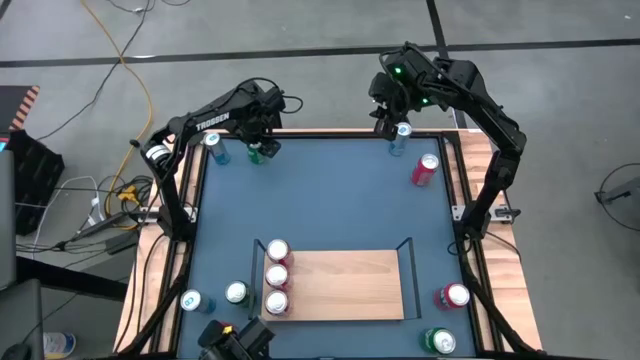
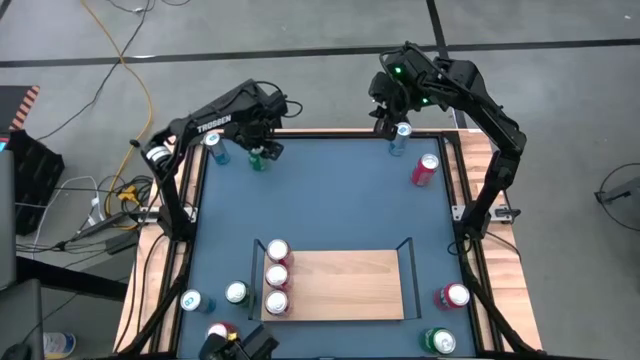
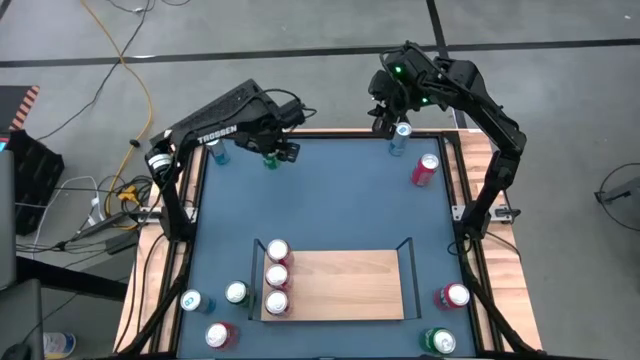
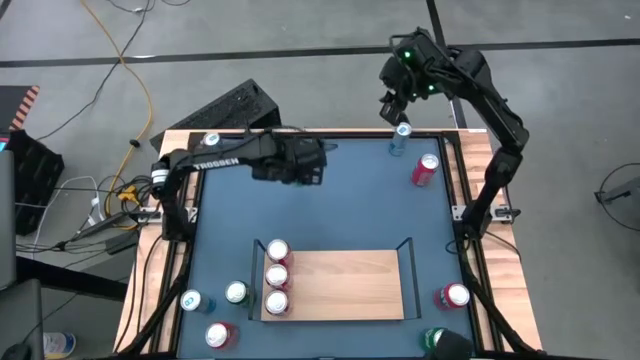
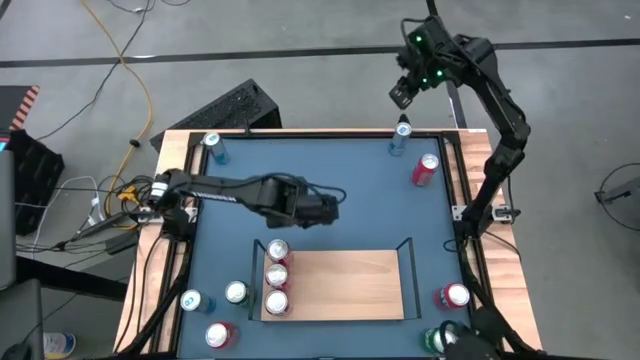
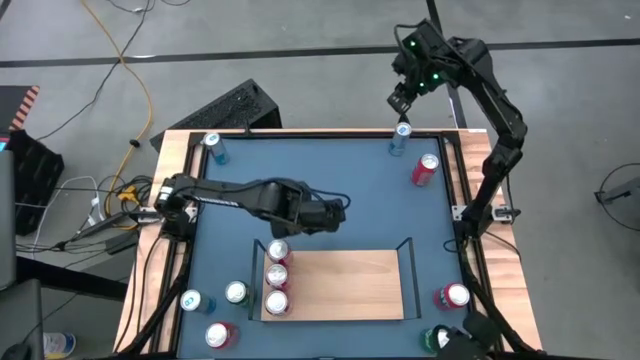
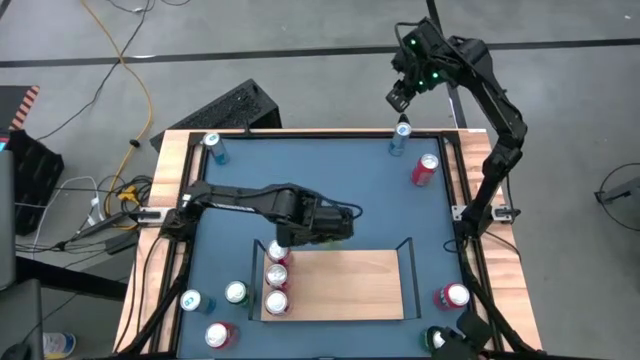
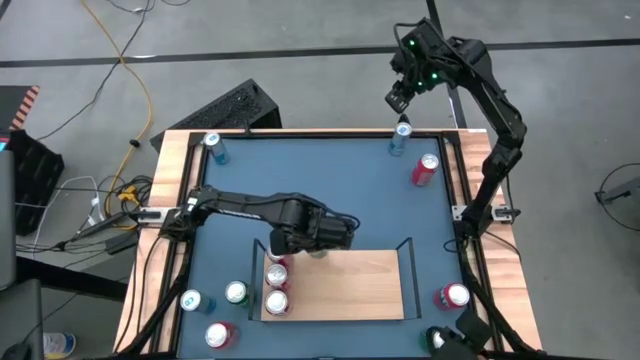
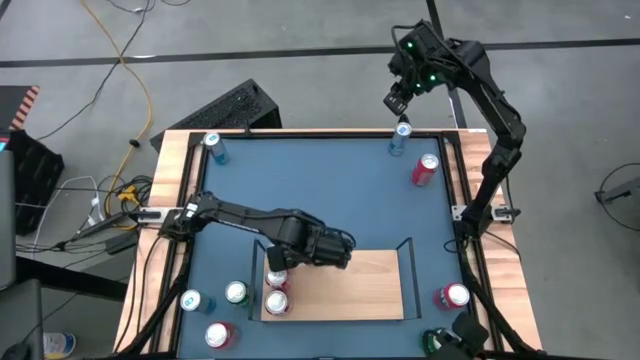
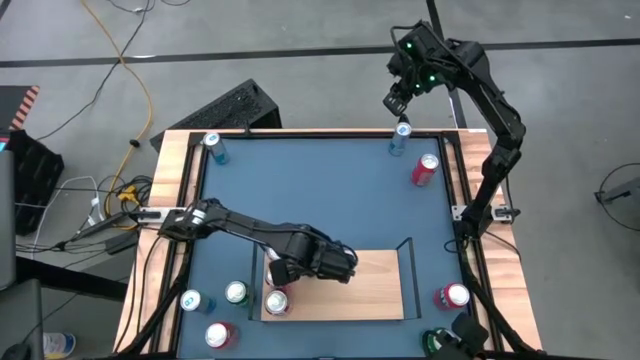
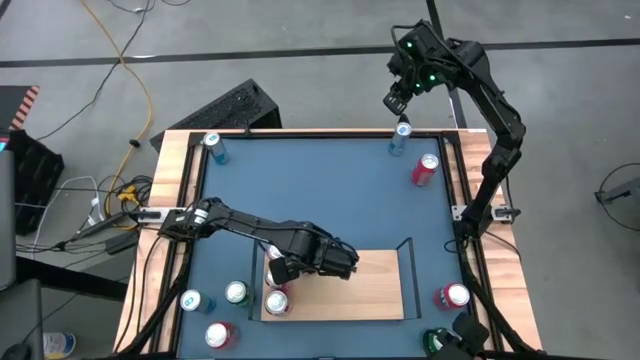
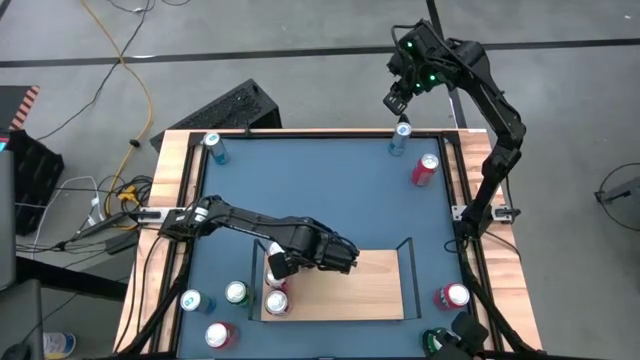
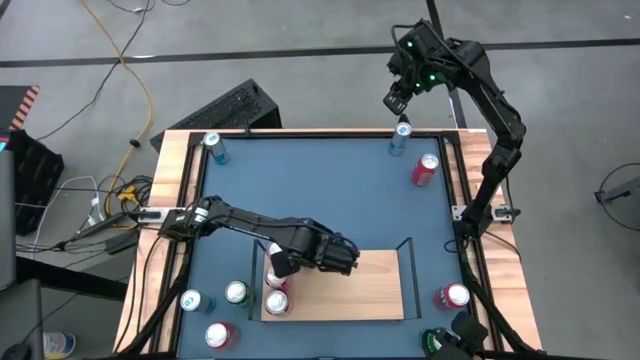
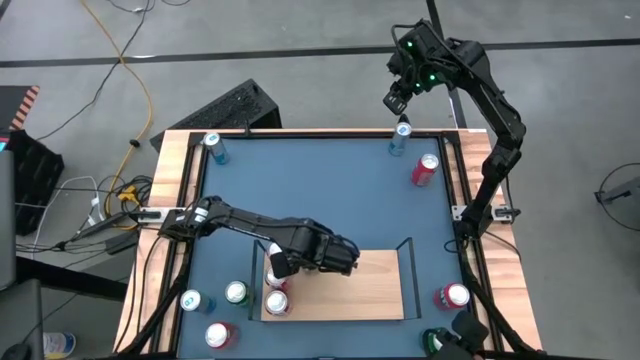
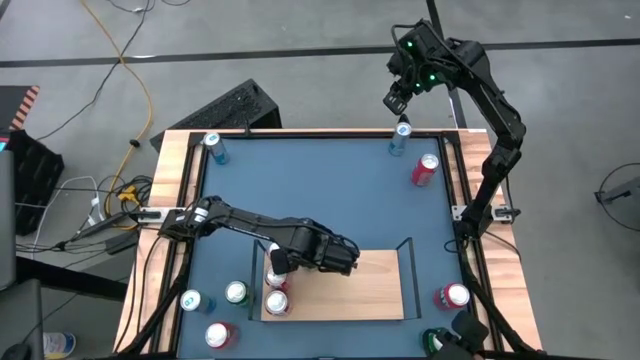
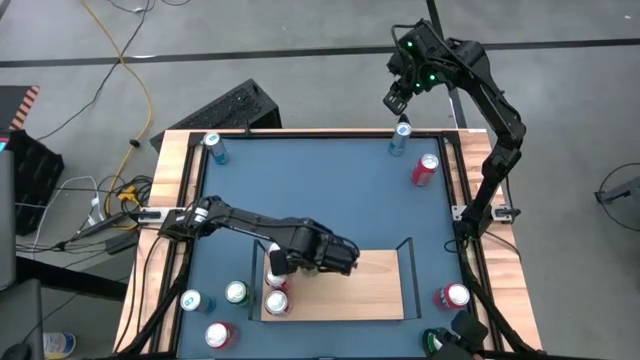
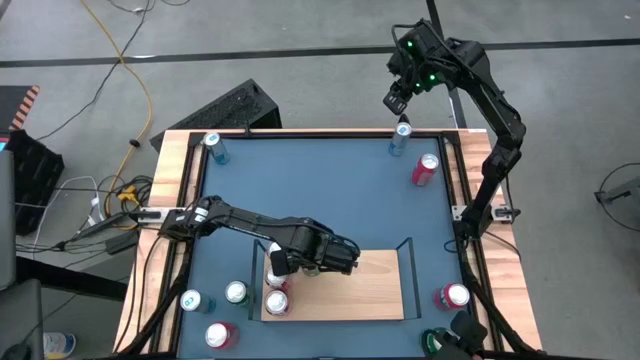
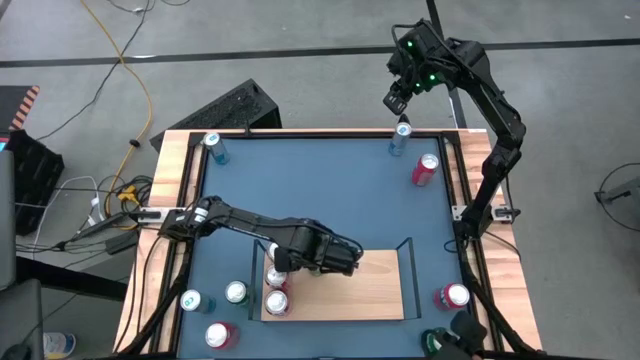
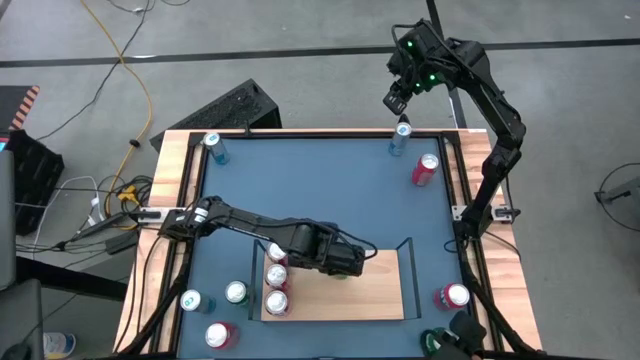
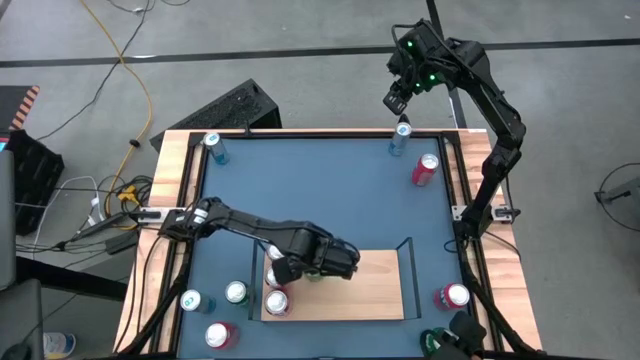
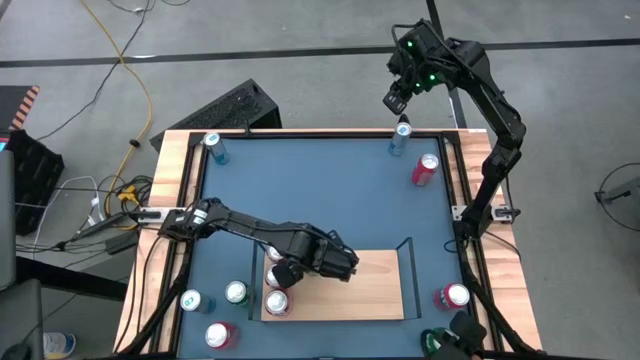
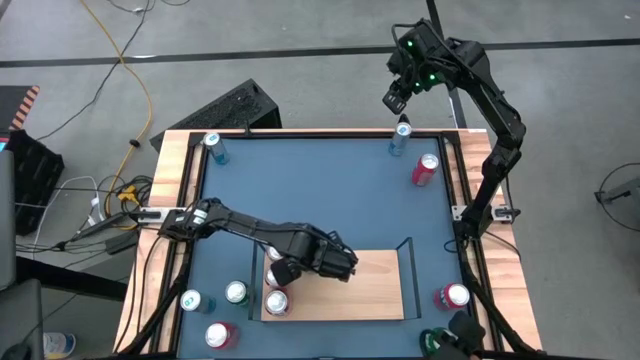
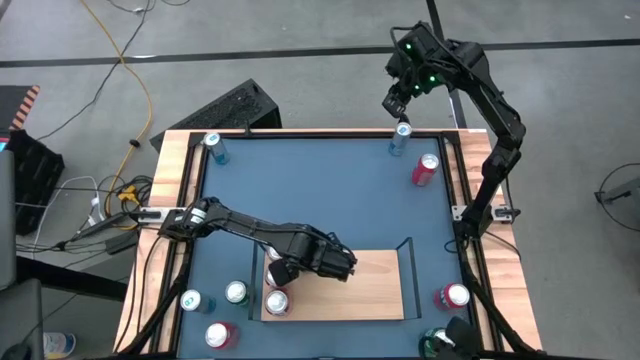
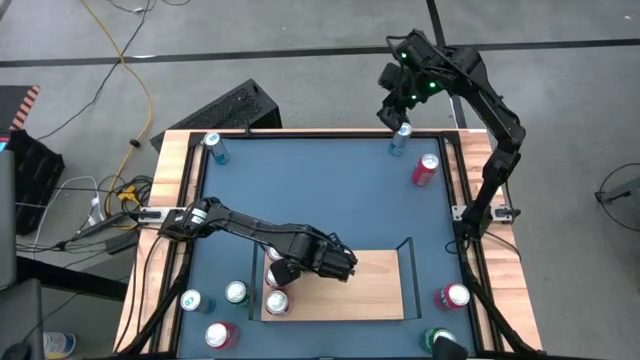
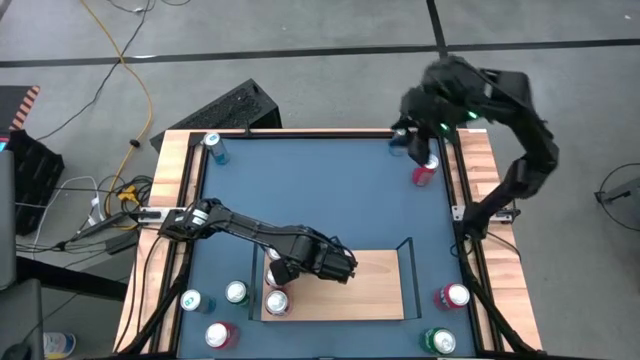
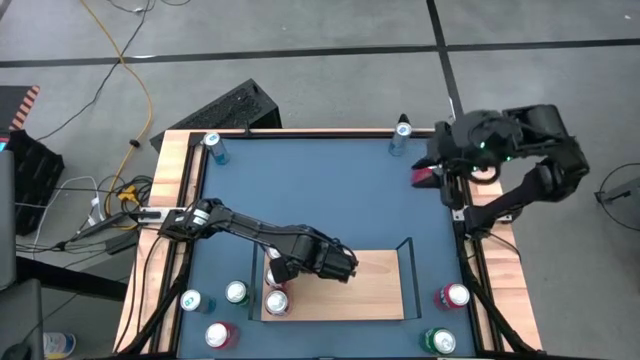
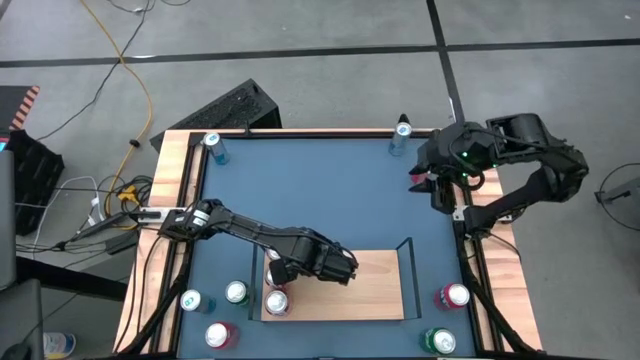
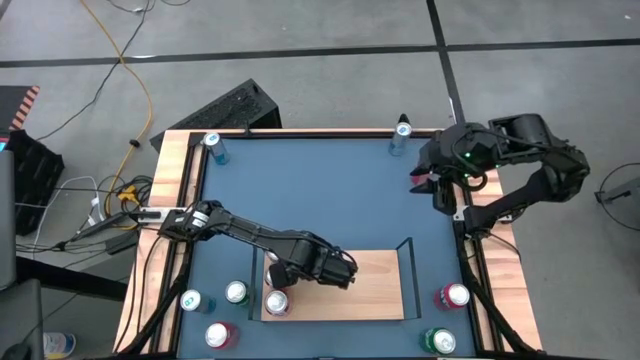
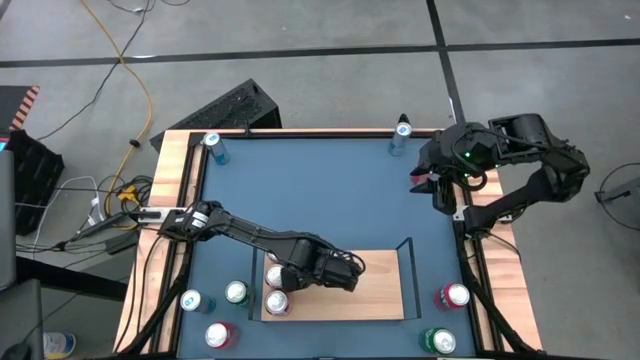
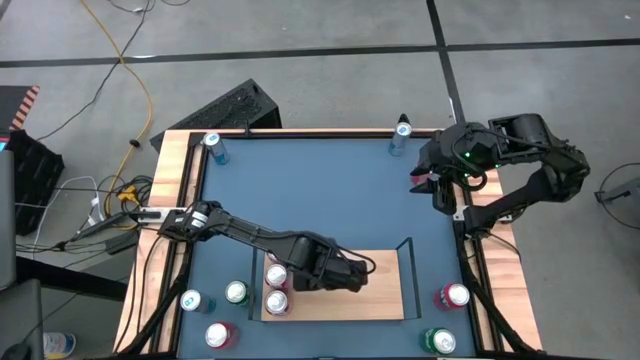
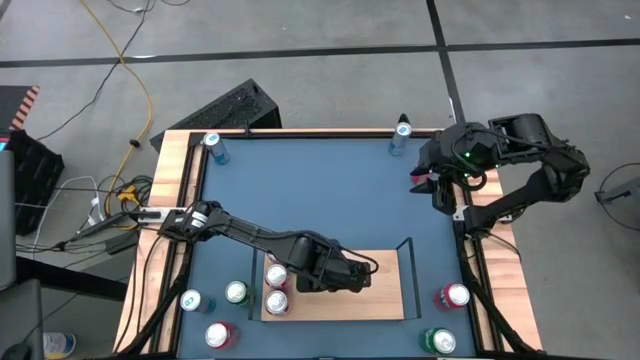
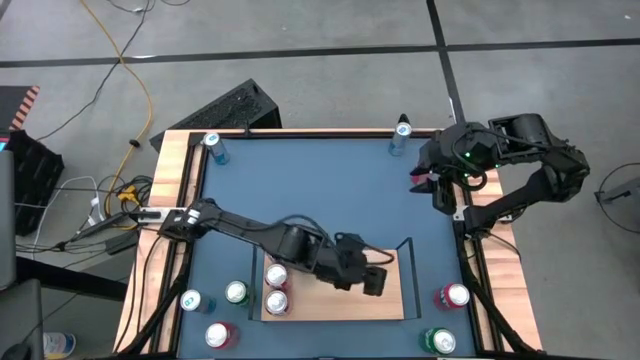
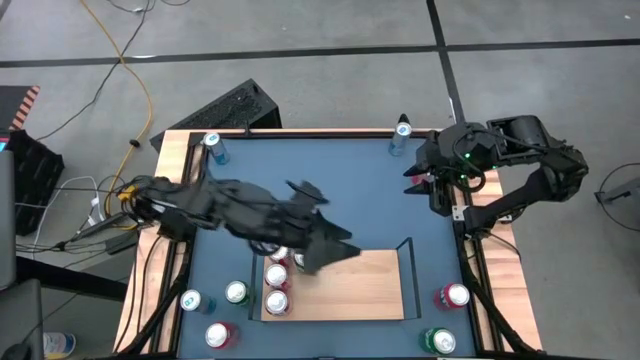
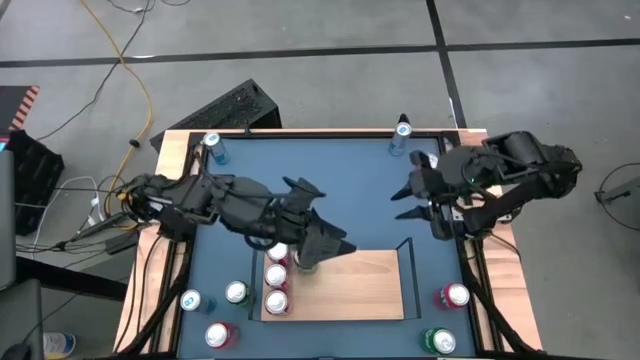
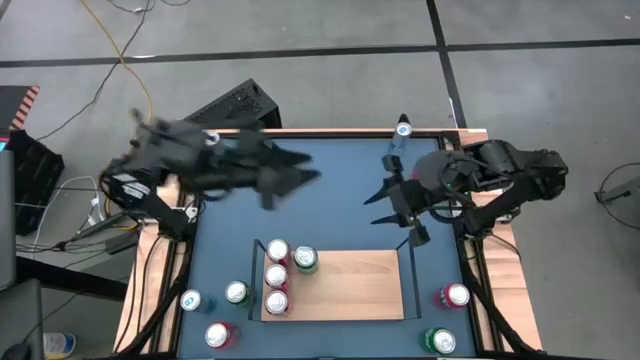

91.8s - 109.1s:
Task: Place canned beverage on shelf
Put the top left green soda can on the shelf aligned with the left red soda can

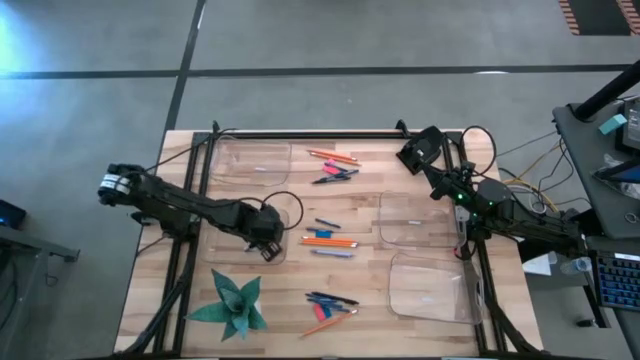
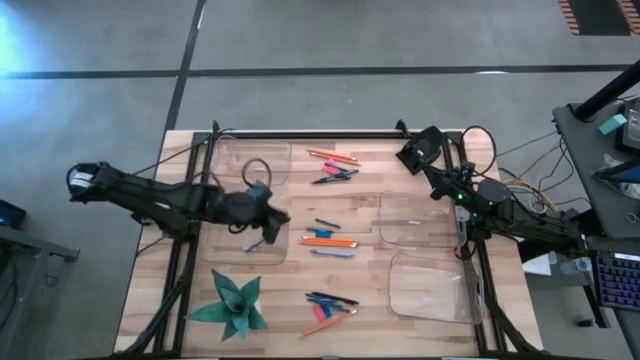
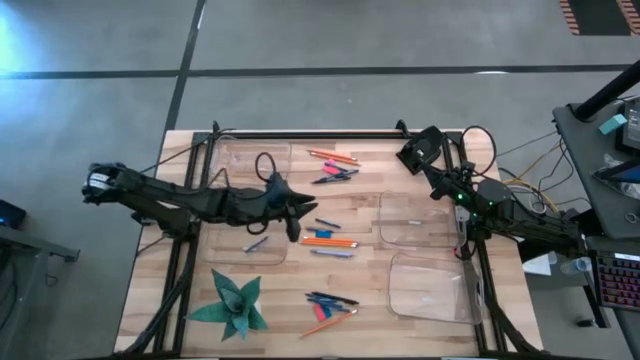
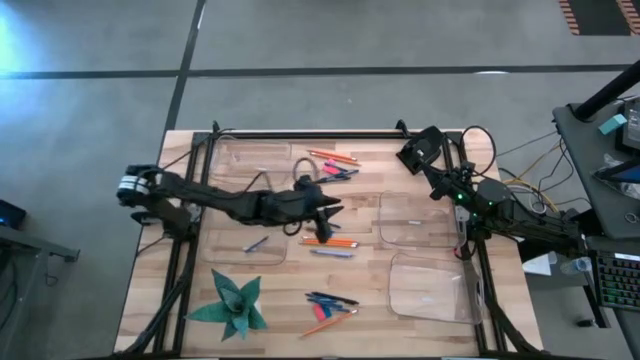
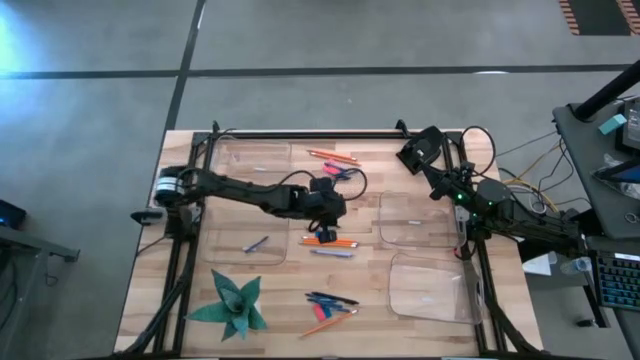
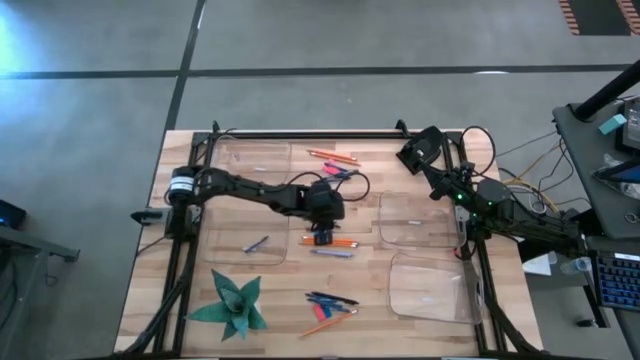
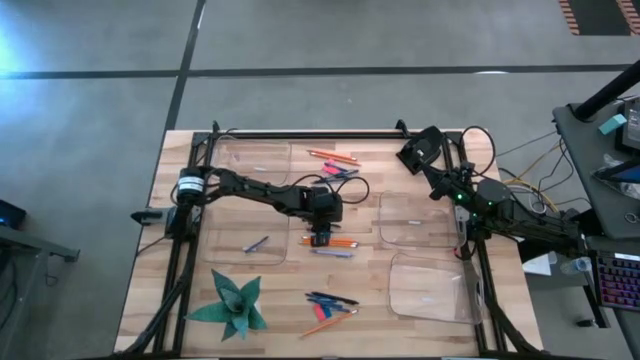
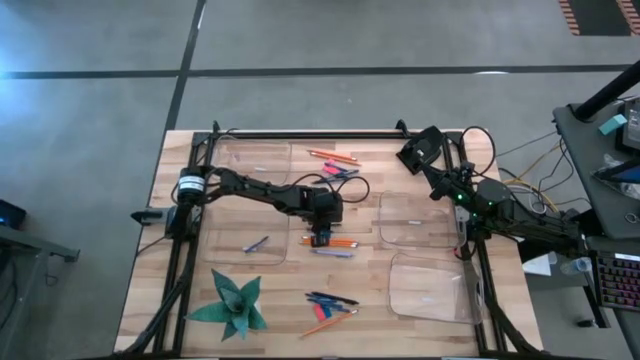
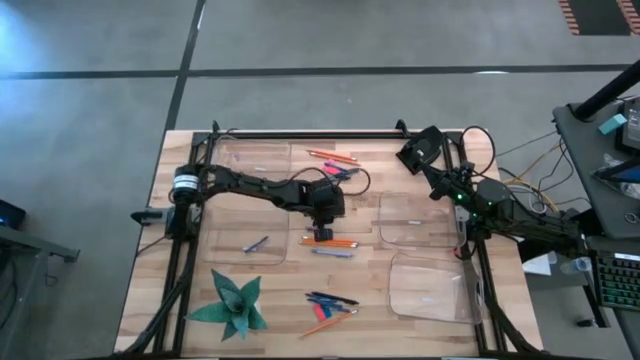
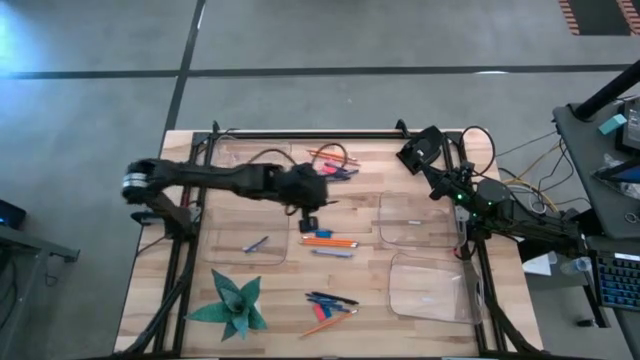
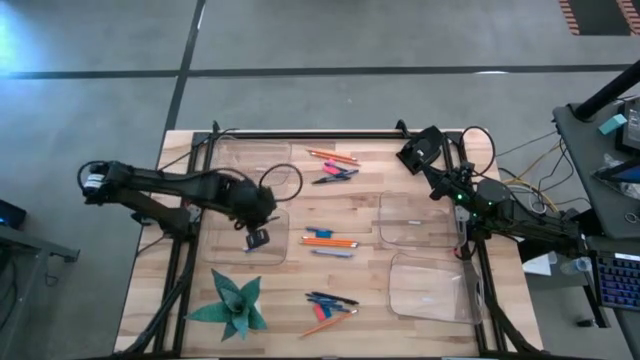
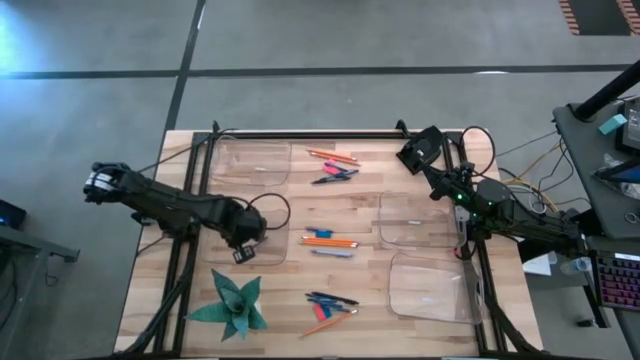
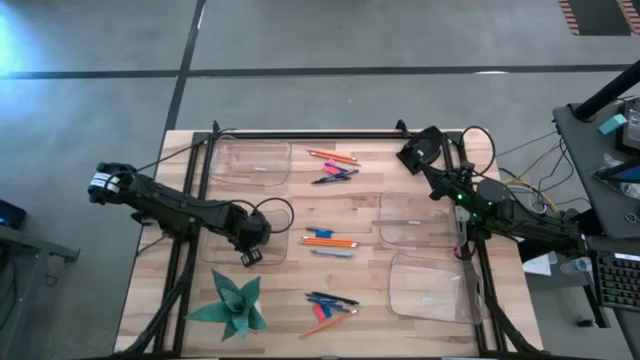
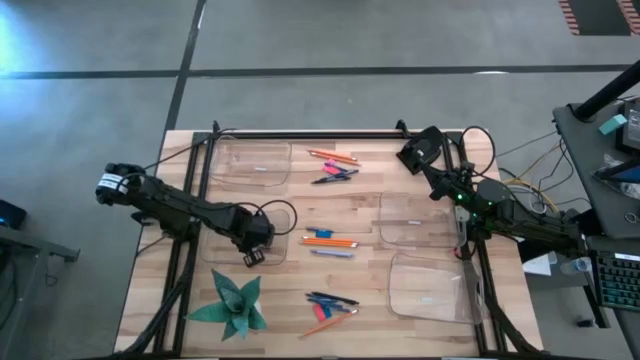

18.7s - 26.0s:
Task: Sort crayons/erasers/pens/pencils in bins
Put the blue crayon into the middle left transparent bin
